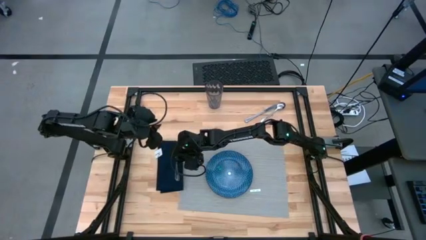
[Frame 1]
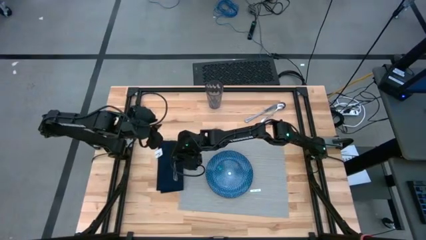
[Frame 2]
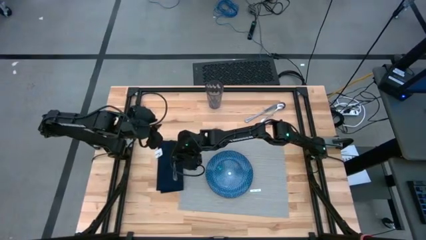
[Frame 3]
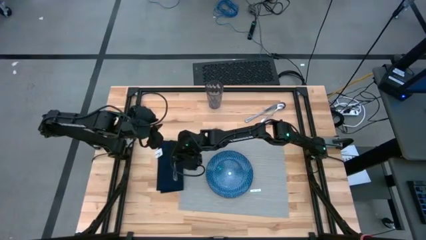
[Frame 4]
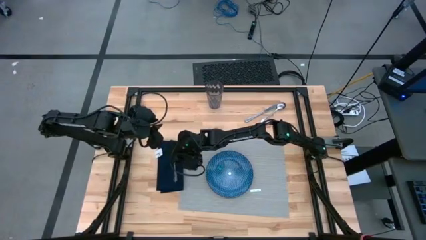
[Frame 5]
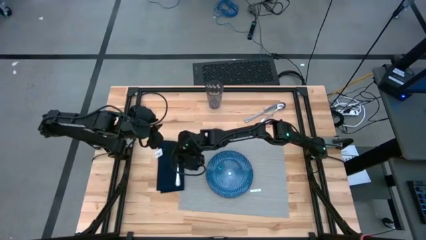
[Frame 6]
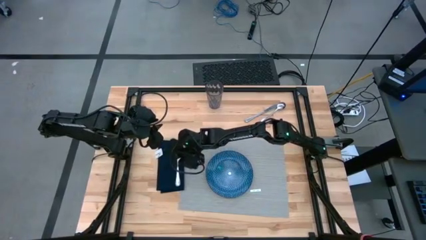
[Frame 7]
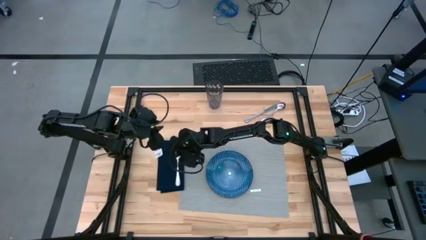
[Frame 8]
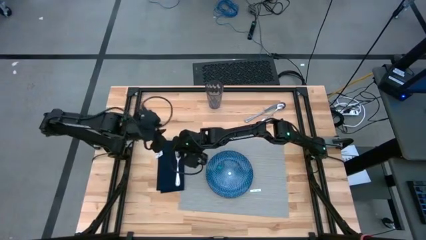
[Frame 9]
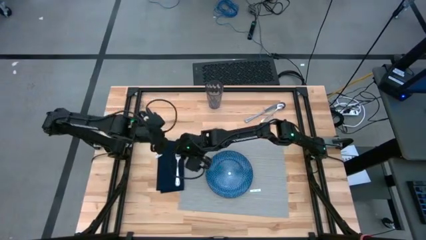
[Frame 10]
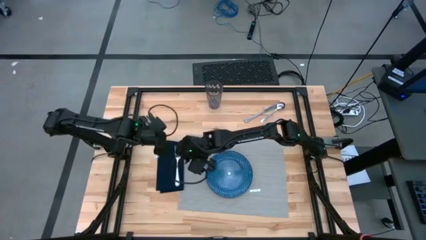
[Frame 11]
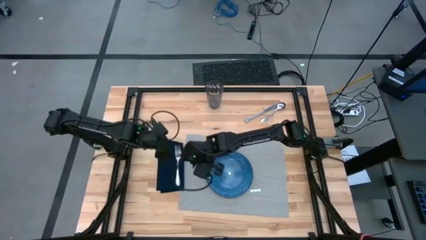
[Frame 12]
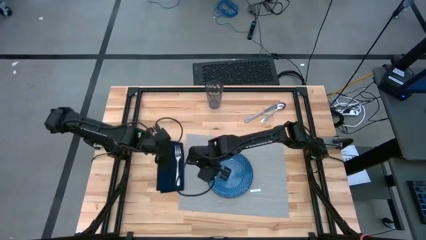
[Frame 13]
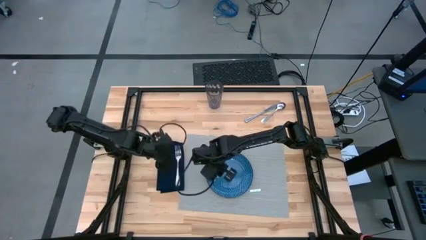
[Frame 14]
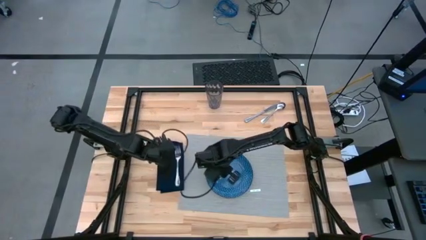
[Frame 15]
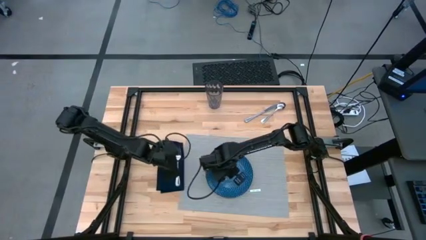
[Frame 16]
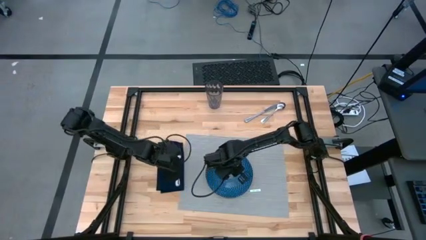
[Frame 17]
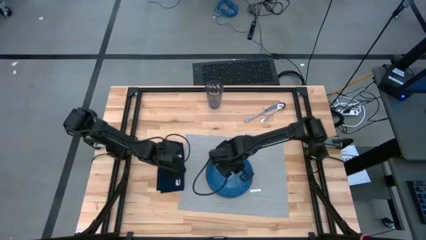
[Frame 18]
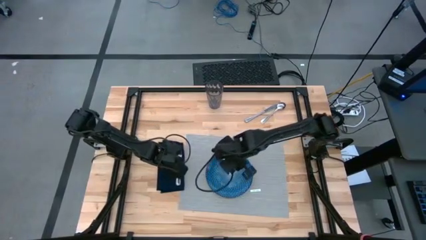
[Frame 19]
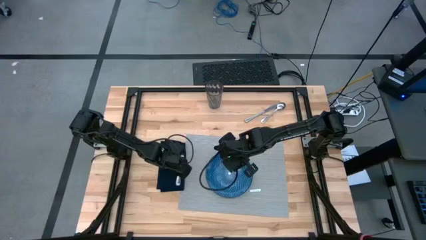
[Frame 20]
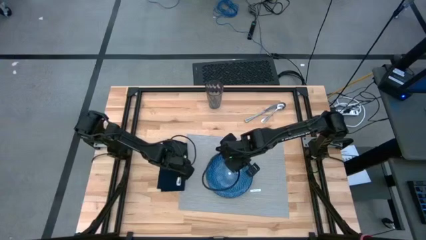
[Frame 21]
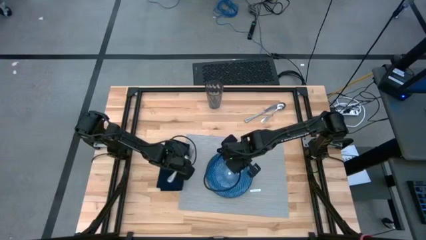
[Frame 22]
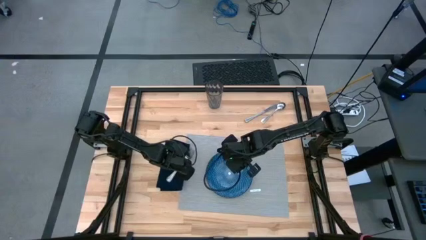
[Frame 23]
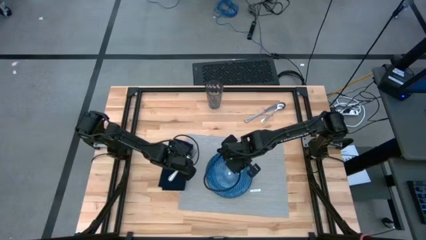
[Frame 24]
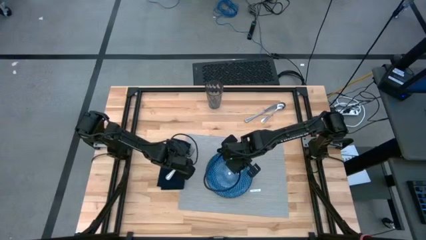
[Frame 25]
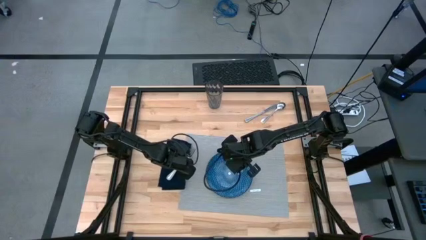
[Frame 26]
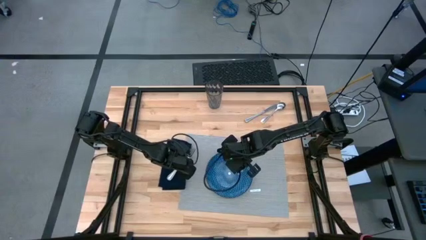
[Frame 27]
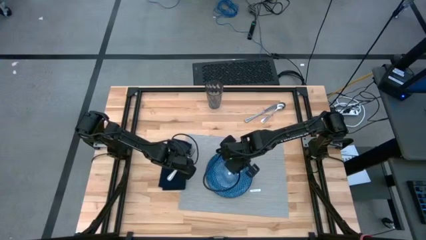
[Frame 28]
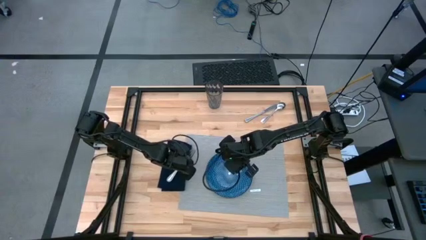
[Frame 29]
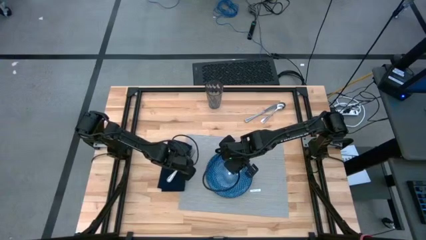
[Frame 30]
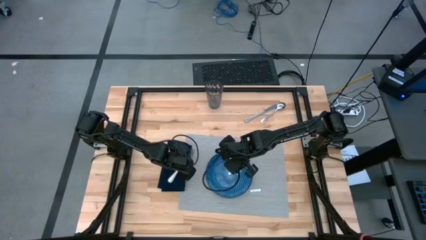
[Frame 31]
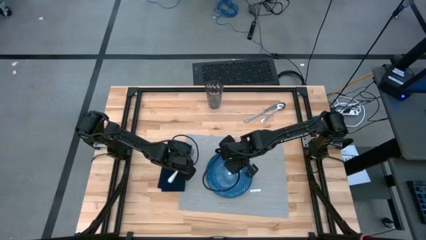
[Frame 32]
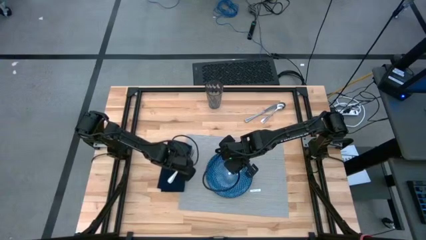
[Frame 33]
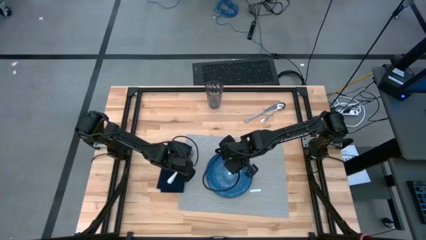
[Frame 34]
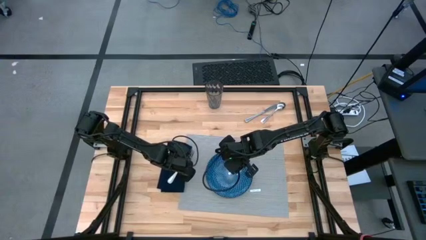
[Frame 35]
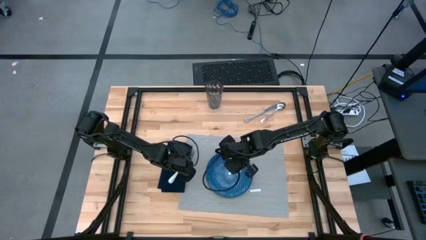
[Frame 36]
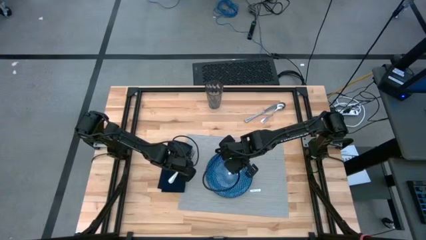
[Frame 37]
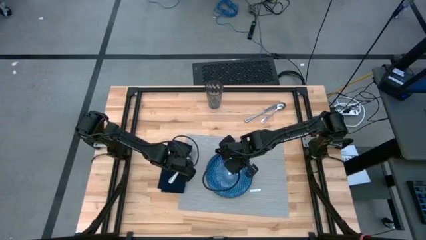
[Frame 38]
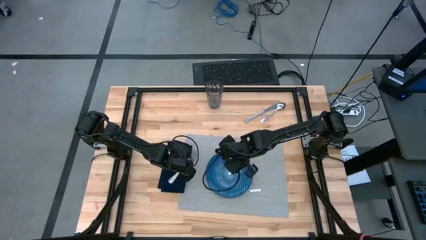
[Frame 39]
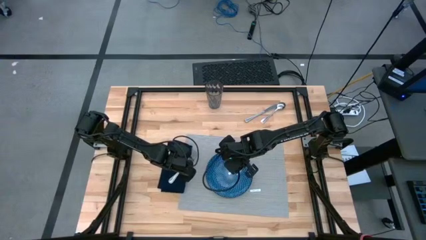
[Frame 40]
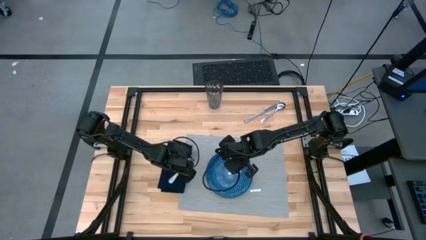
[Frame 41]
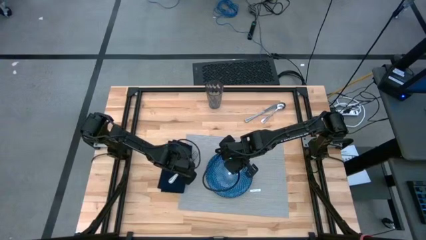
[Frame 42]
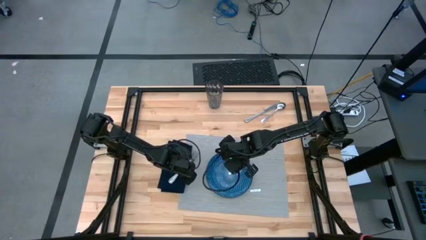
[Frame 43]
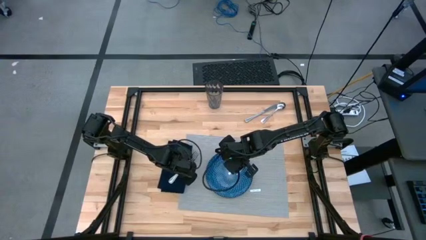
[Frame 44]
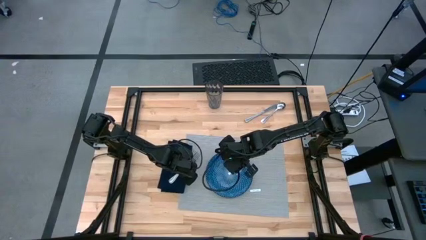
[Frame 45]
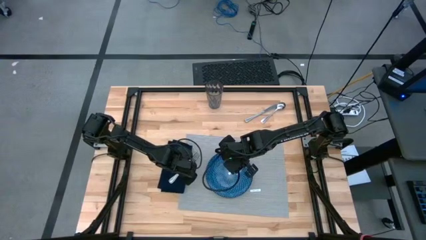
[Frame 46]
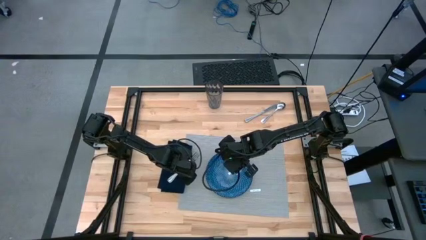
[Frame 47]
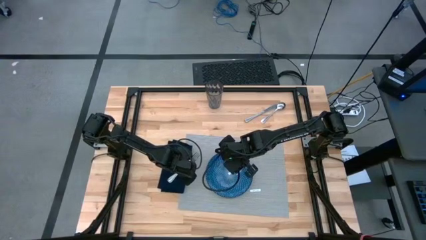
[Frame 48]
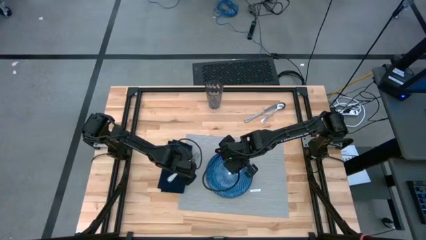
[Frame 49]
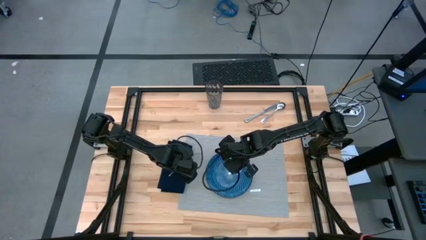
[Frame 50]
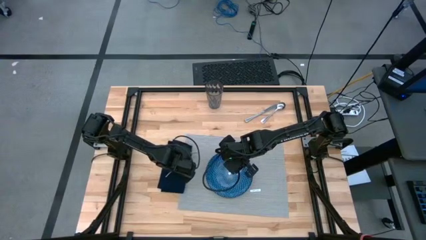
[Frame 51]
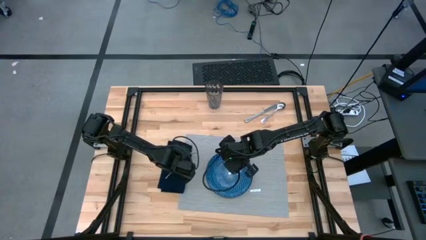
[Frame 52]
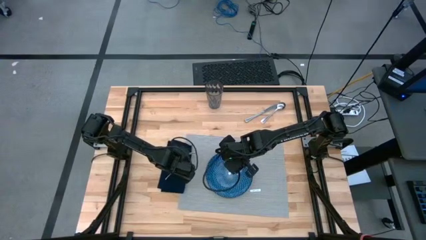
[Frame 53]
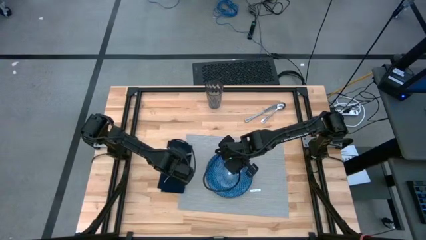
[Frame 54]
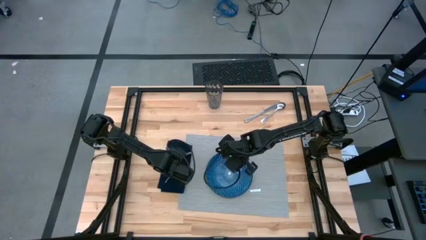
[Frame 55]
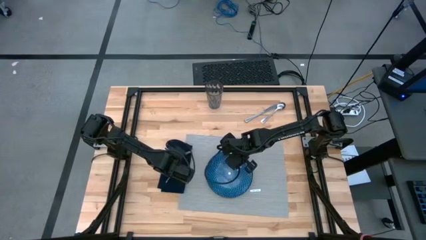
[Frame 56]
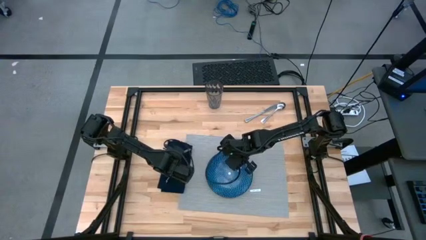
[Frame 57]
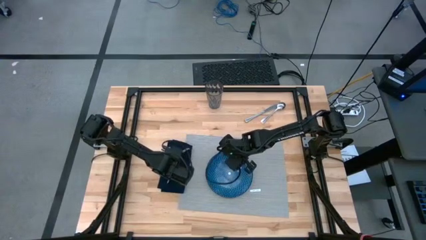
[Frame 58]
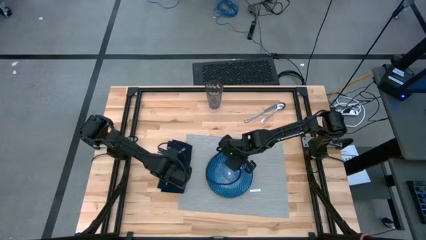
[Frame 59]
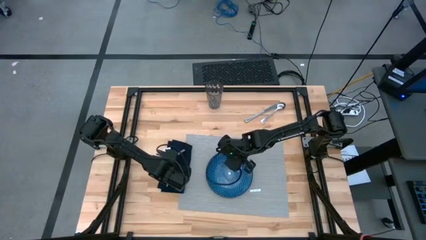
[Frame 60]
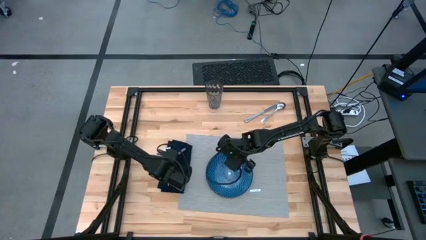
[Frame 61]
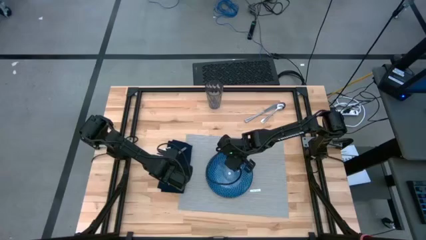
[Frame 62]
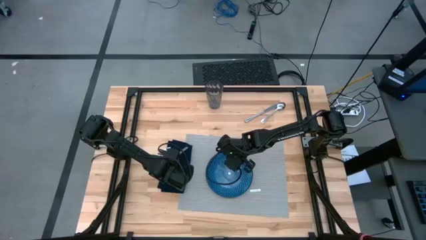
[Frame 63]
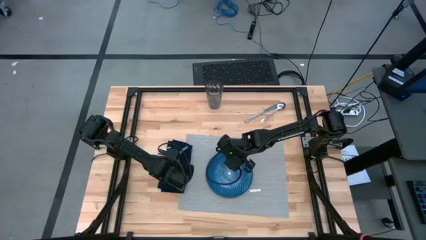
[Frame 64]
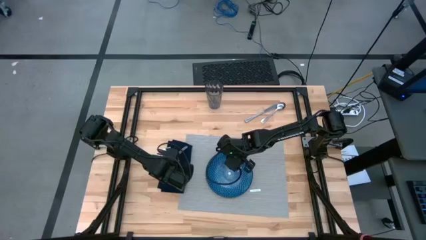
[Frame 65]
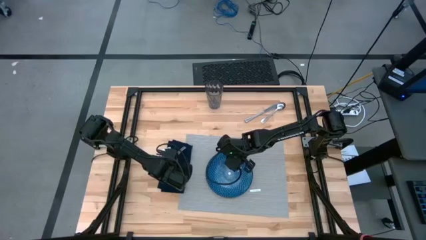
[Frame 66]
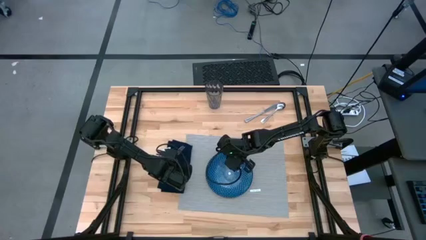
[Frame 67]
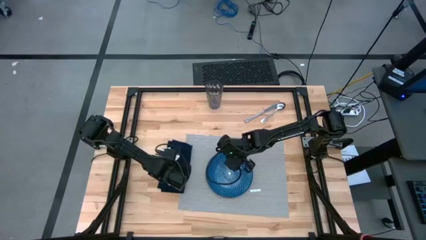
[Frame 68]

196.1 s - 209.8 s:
Task: Set table place
Put the silver fork on the blue napkin

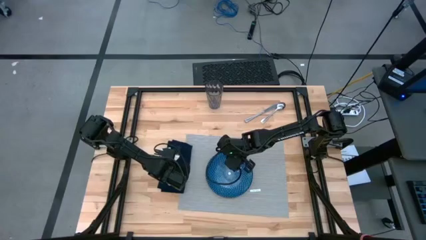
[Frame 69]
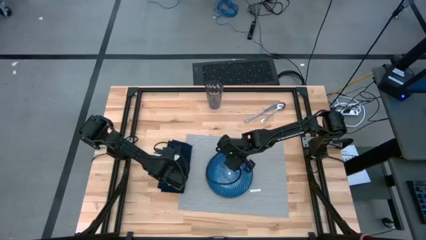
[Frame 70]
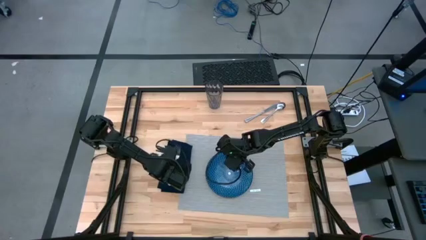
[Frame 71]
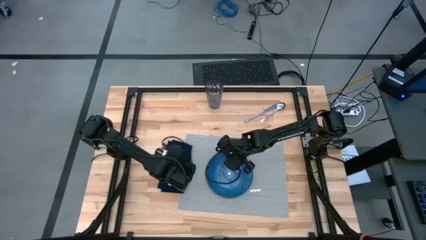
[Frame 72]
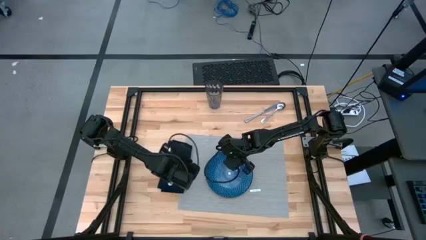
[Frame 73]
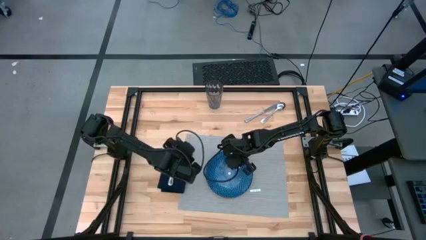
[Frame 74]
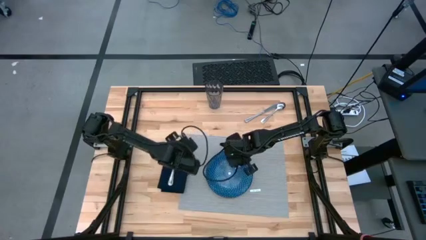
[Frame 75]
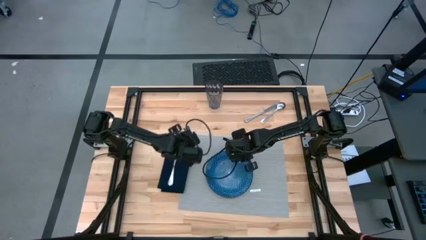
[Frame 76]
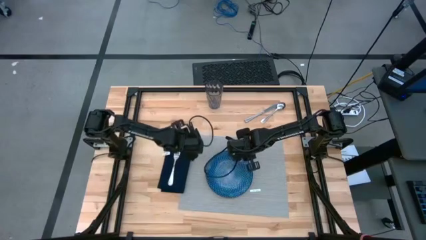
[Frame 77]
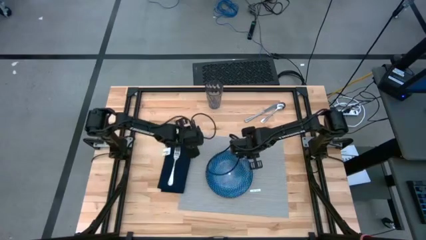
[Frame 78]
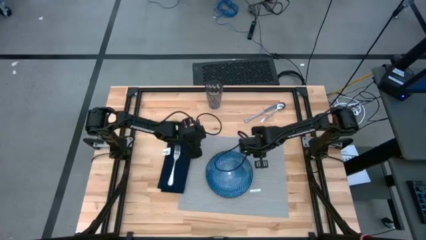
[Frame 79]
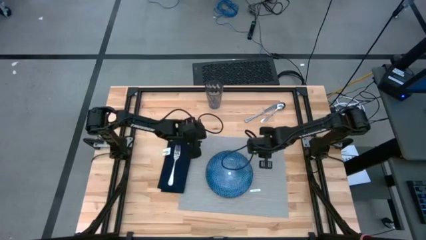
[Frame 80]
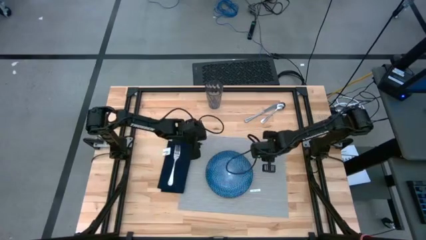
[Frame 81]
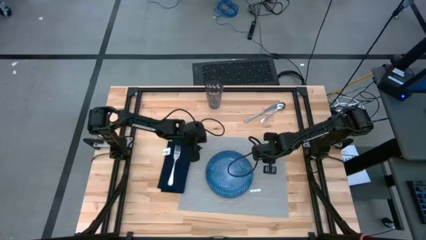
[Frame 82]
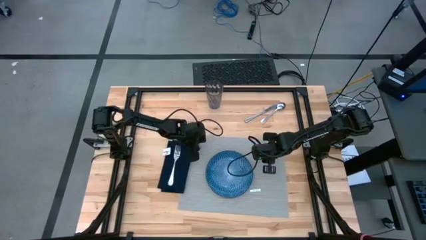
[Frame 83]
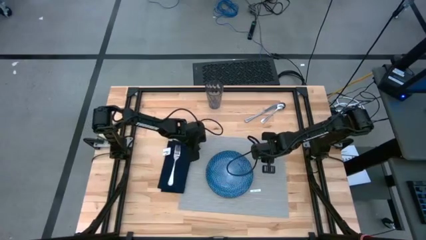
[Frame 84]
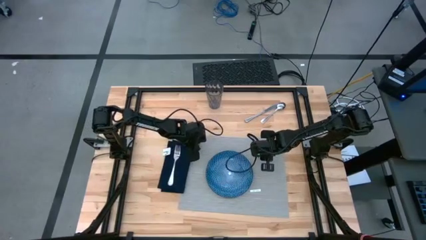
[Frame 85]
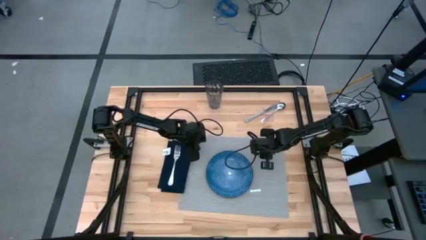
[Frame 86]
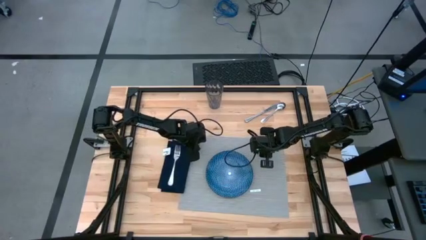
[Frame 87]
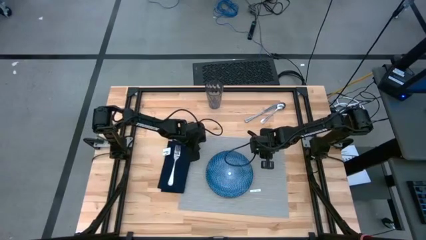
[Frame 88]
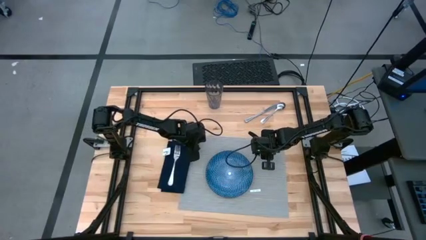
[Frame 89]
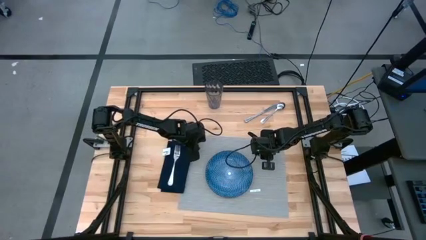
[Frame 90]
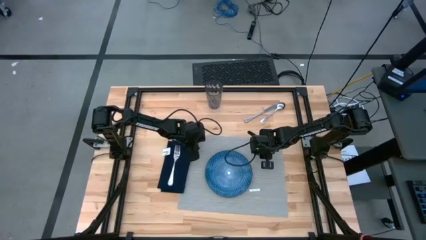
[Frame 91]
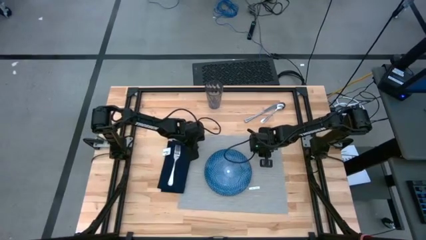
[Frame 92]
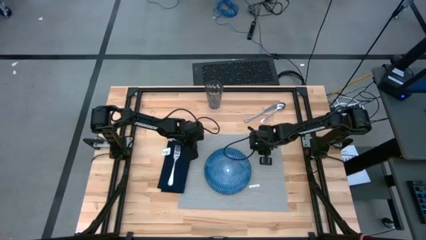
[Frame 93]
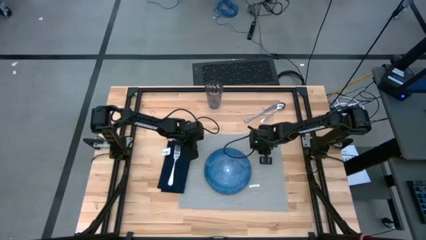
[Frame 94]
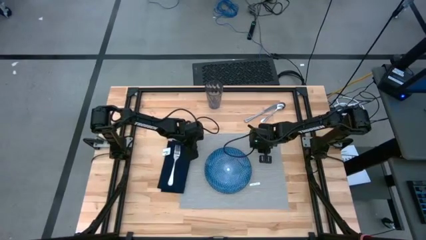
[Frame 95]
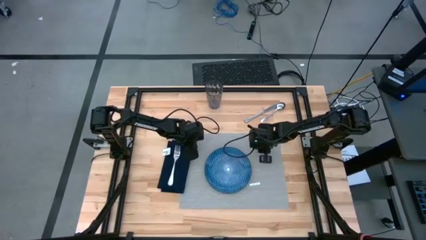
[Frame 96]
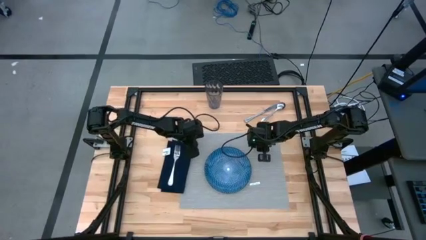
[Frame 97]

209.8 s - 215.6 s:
Adjust the gray placemat
